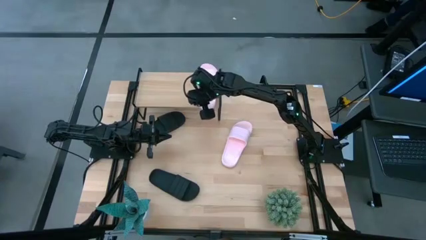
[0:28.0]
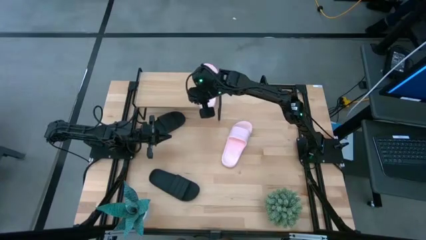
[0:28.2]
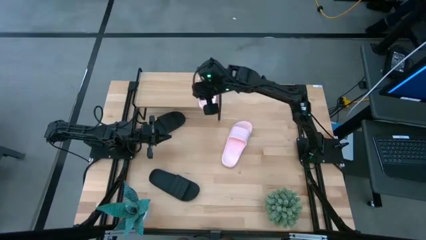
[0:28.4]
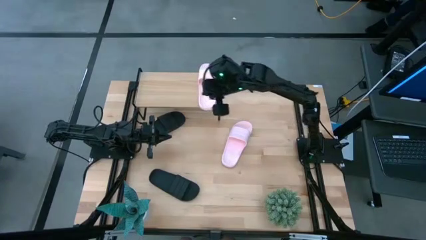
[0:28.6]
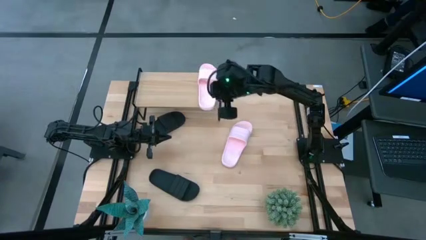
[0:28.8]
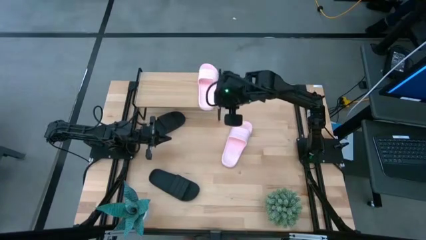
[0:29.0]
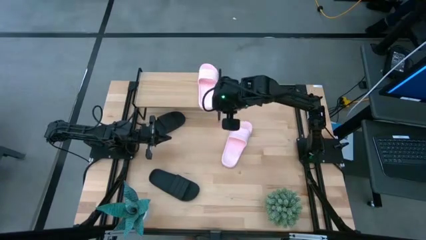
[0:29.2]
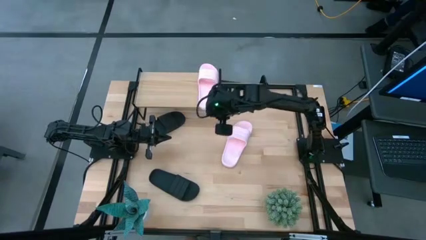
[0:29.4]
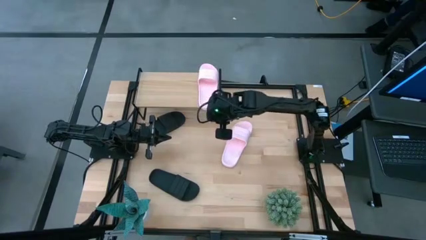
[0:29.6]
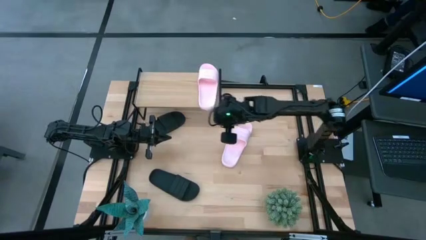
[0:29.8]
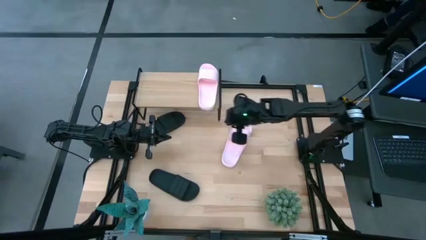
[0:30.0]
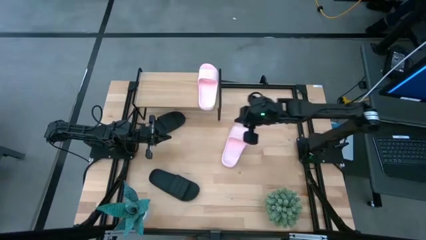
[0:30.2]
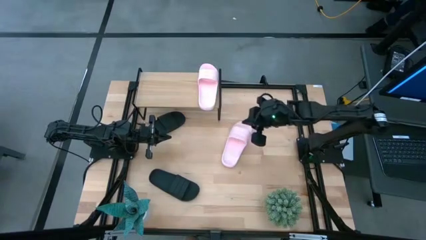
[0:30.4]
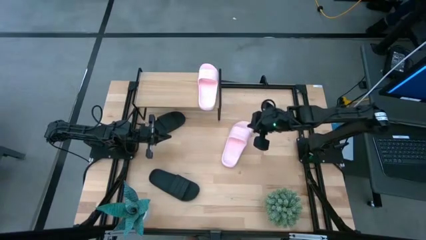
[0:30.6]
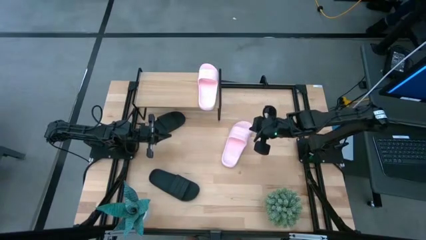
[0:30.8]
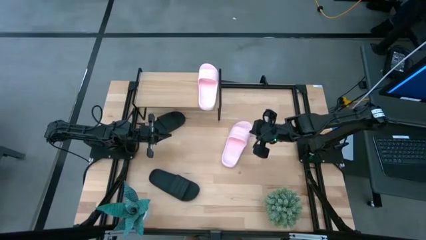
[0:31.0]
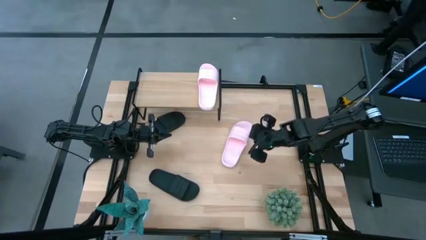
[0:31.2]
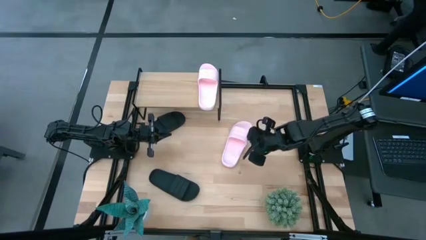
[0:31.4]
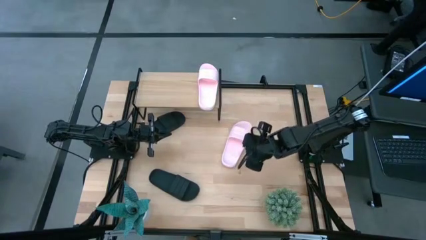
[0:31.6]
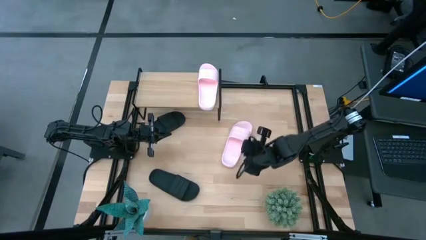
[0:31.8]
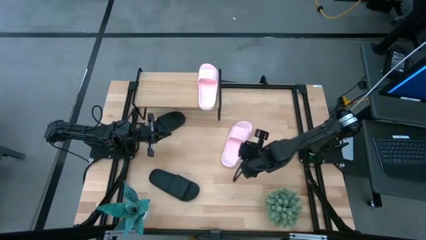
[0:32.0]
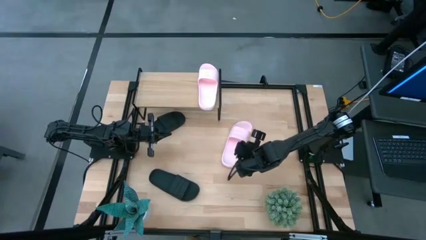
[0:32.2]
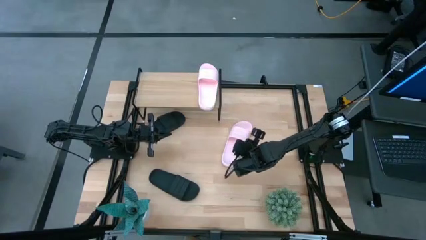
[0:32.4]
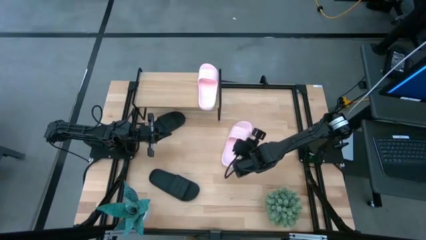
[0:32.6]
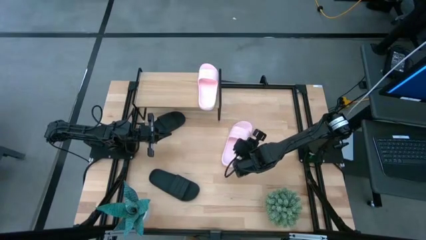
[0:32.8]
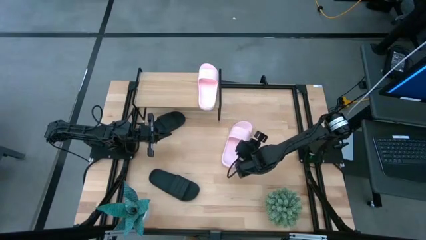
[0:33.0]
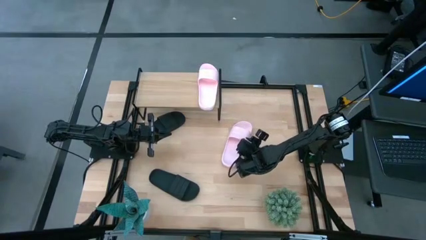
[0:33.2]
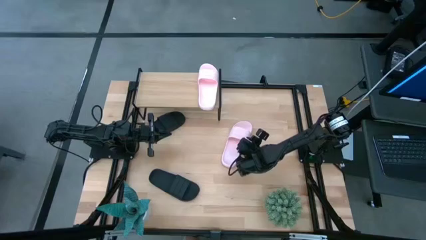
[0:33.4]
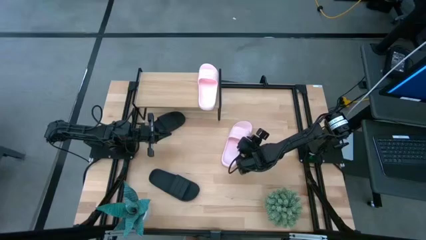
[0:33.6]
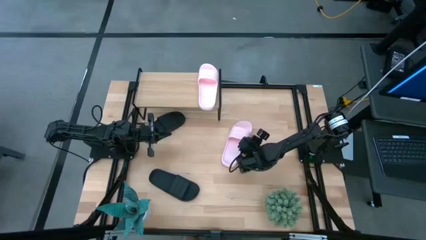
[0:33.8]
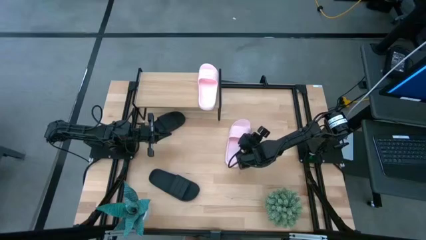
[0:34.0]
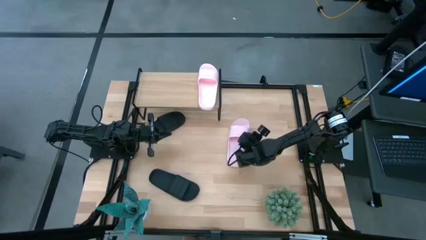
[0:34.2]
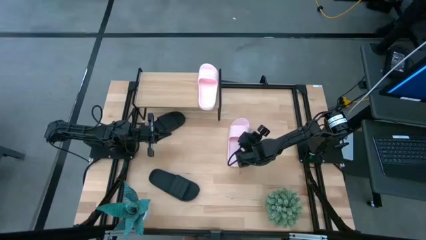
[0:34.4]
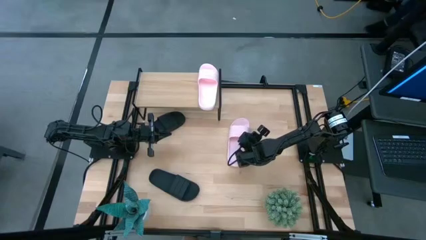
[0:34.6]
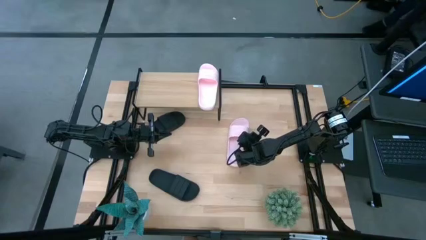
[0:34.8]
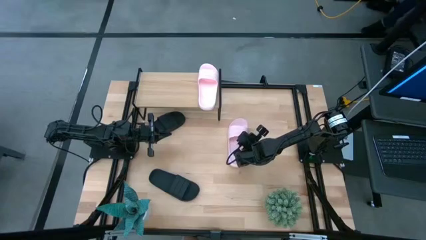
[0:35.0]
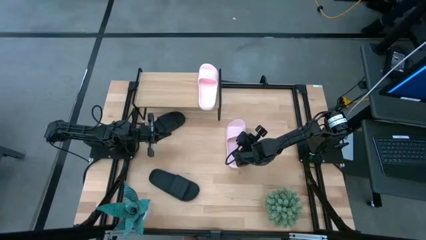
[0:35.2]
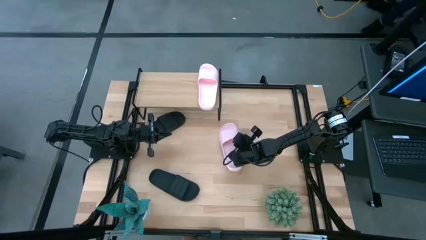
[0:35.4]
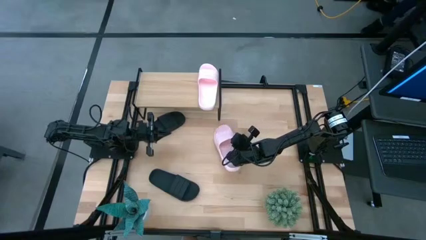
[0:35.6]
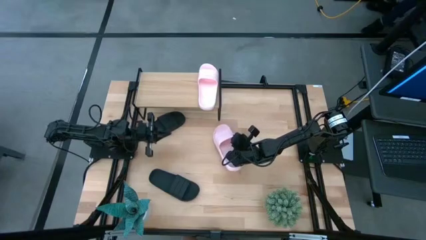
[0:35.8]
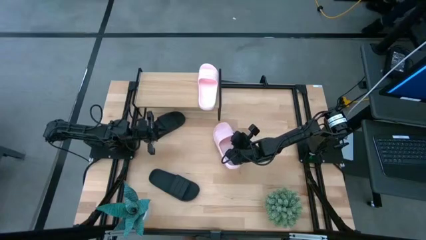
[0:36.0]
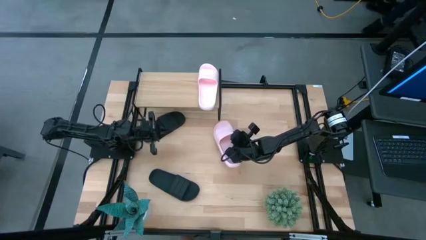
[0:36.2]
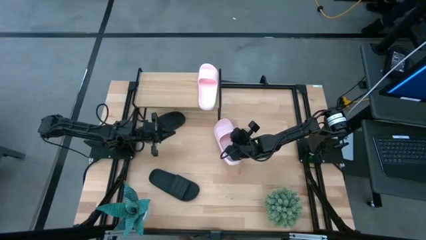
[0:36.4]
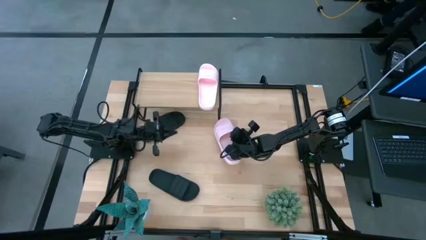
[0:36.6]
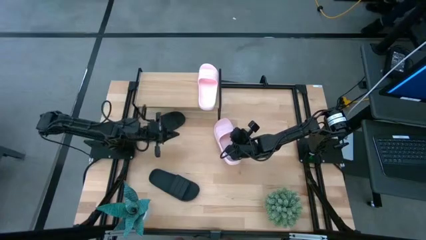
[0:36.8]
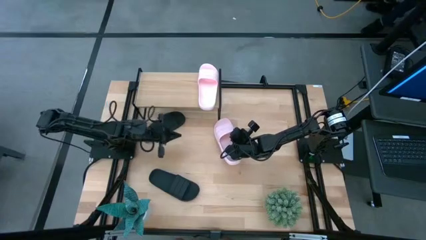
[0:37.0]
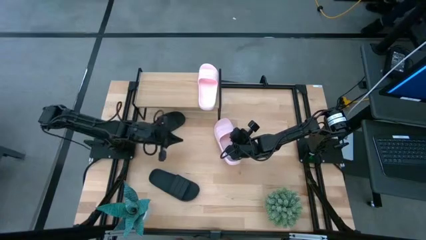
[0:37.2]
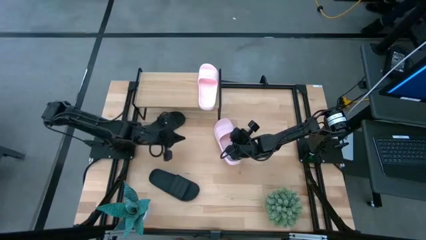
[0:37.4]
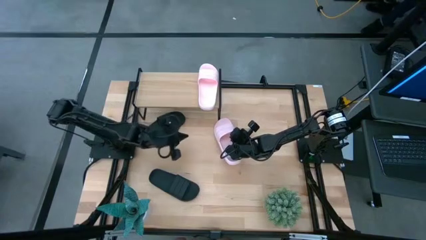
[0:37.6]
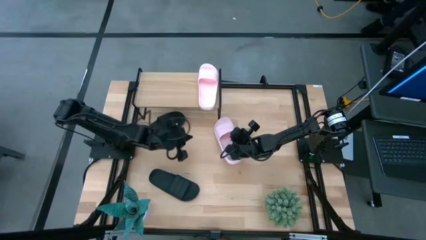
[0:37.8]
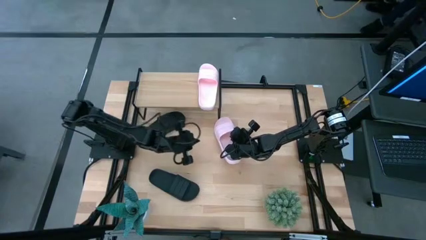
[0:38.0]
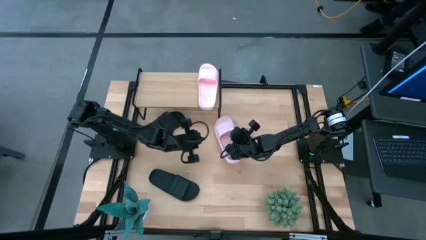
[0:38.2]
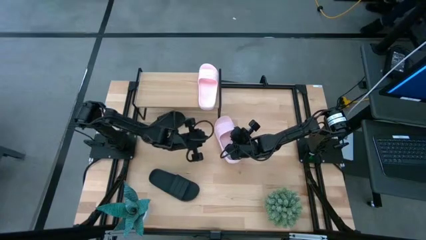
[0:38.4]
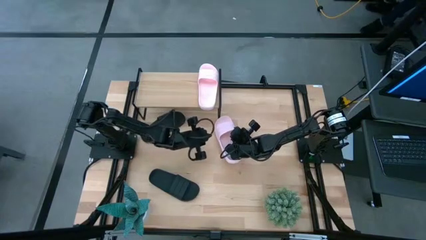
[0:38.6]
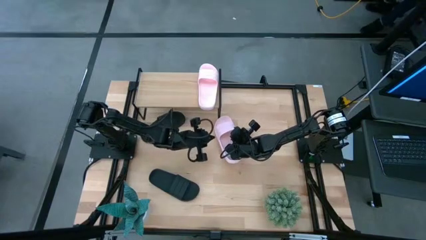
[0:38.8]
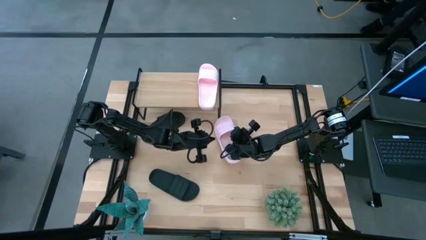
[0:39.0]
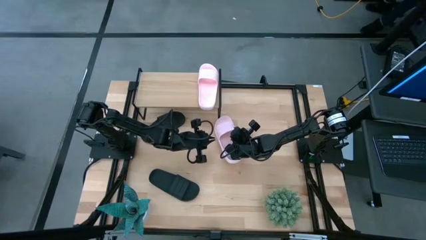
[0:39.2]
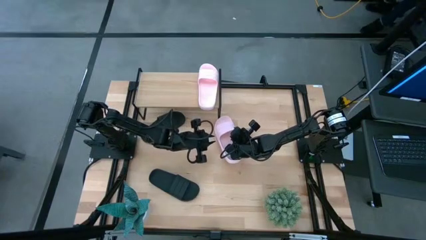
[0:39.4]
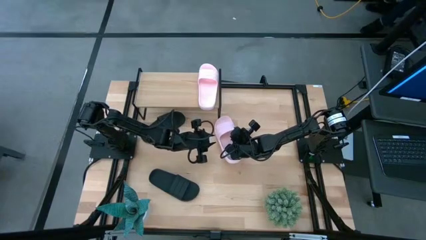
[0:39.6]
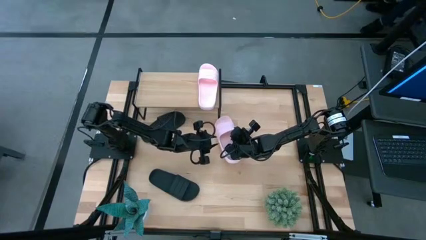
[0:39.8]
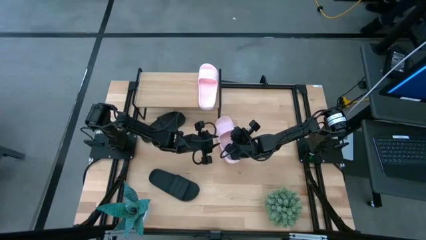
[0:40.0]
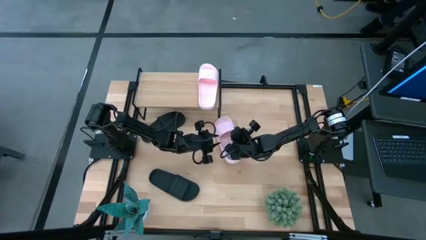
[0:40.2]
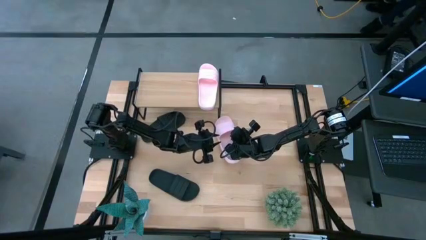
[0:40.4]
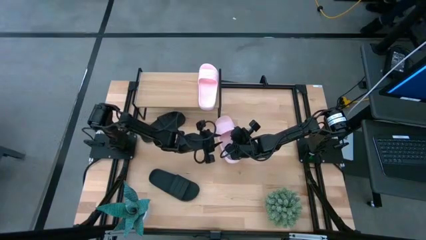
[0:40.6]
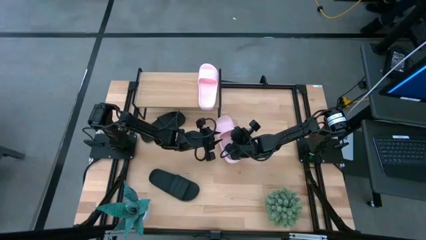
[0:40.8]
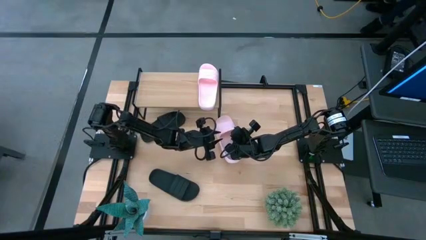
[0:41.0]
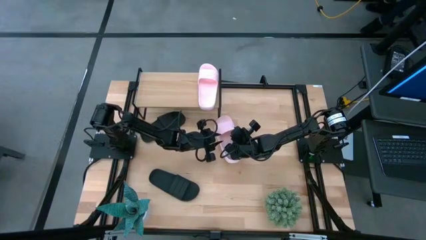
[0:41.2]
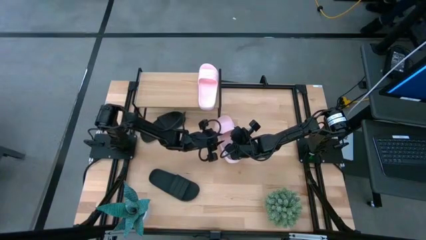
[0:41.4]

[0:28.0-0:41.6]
Task: Pick and place slides into the shelf
Put the pink slide on the shelf
